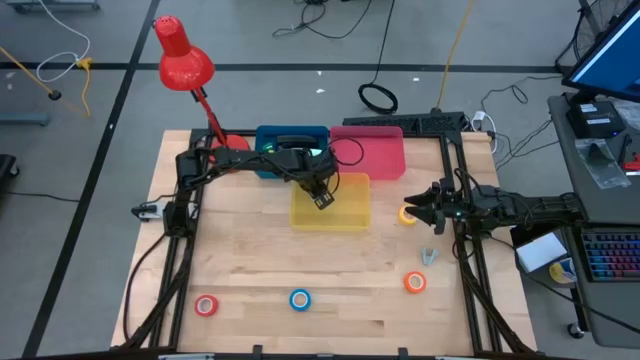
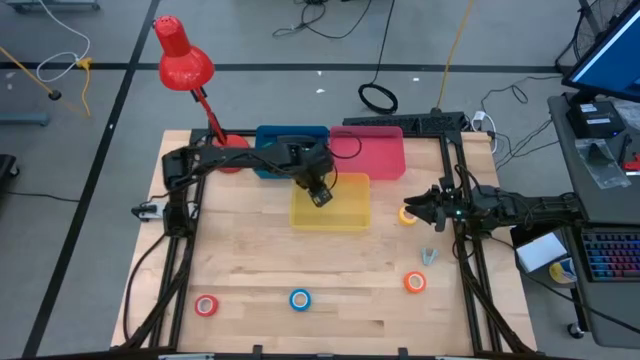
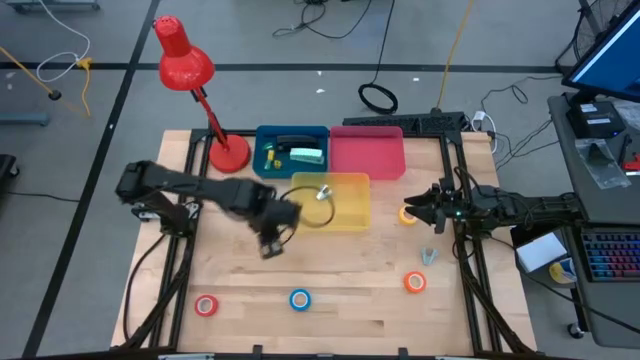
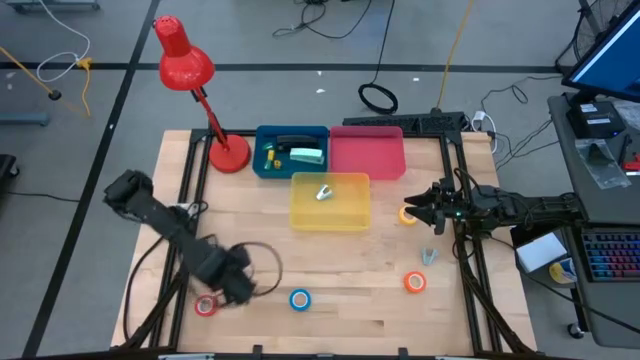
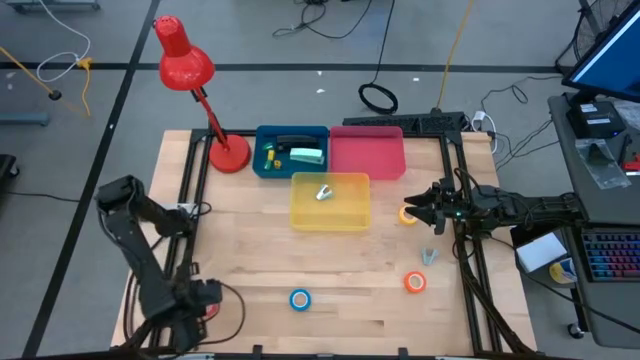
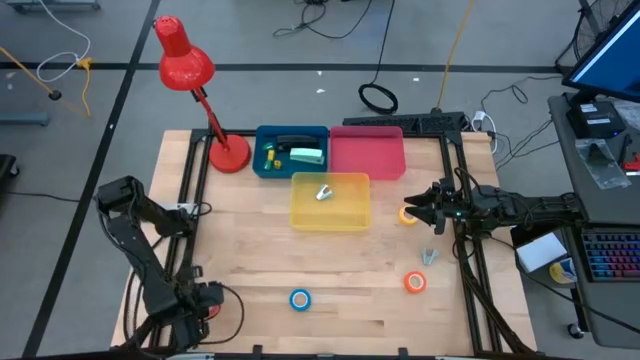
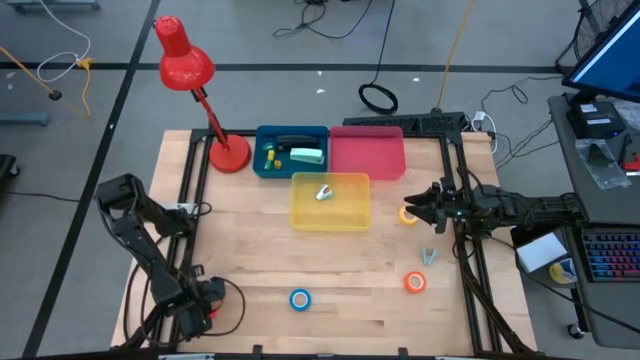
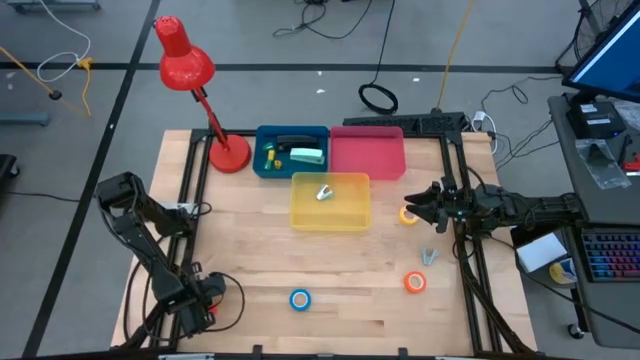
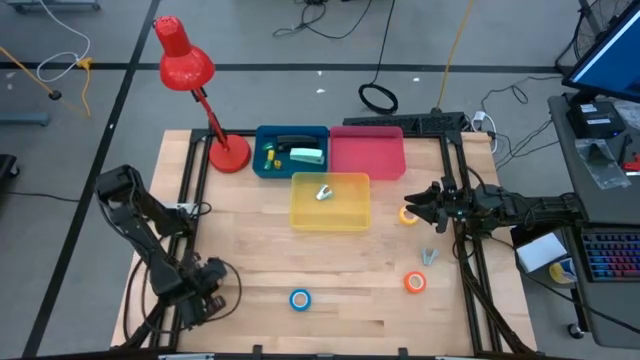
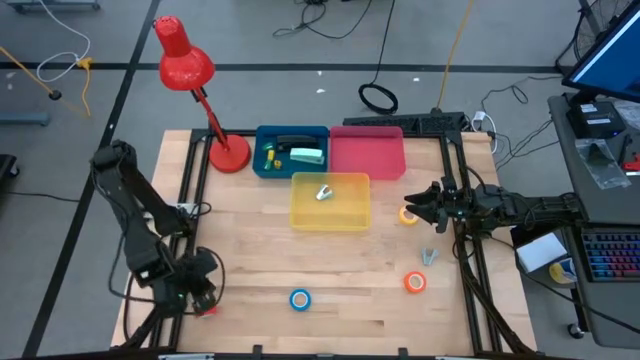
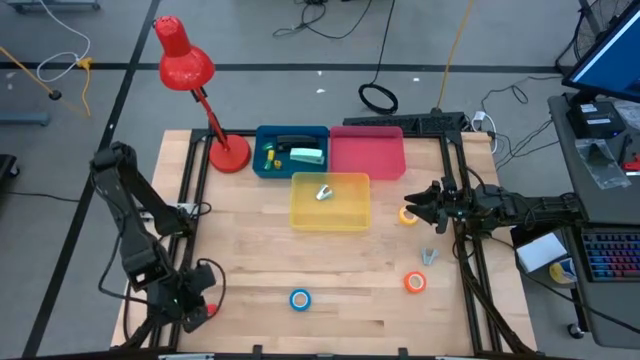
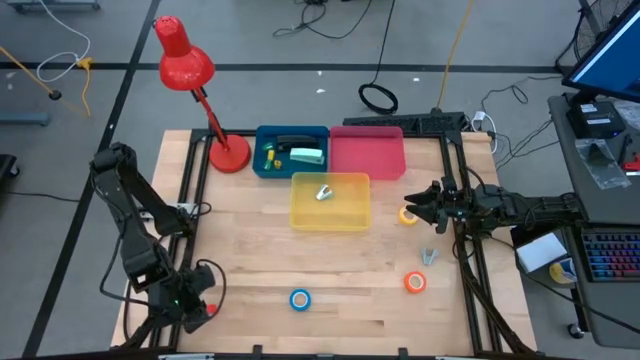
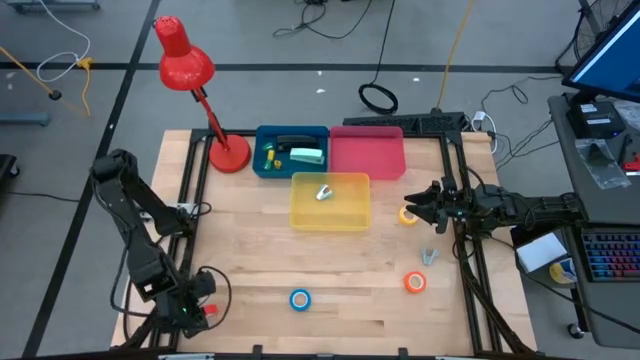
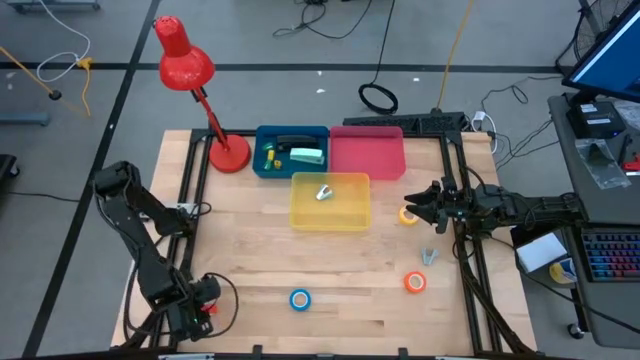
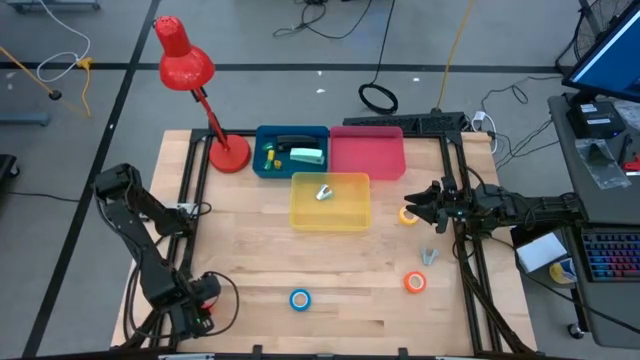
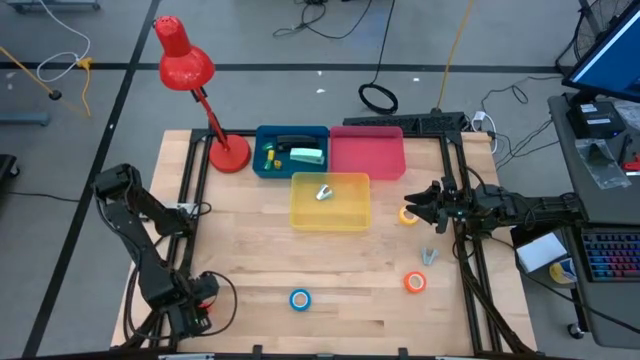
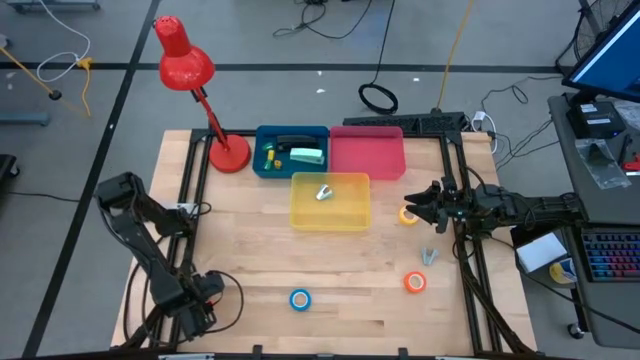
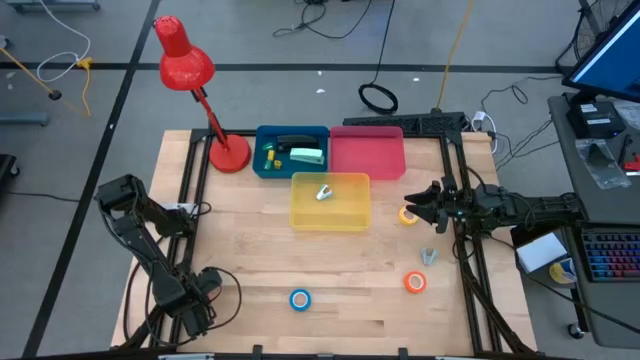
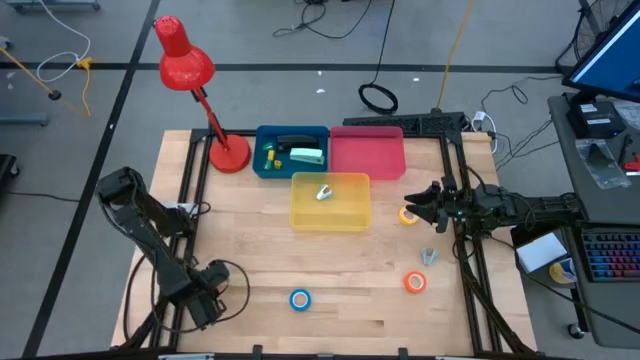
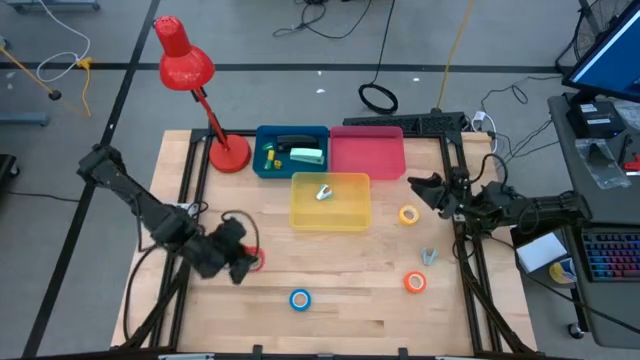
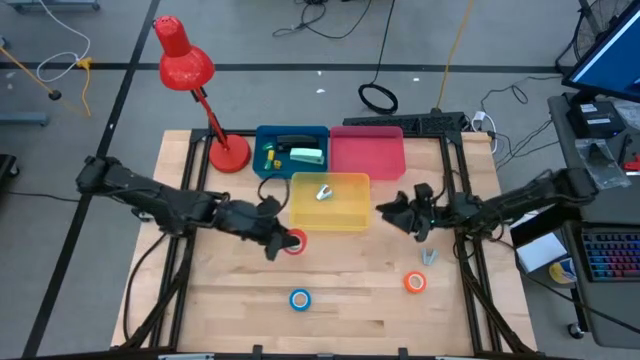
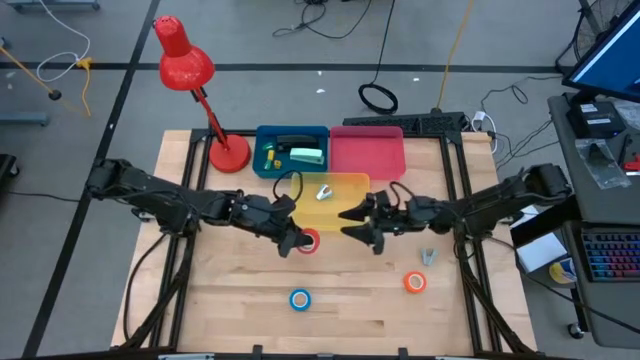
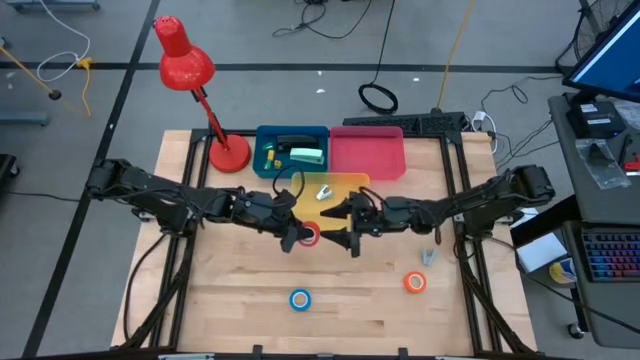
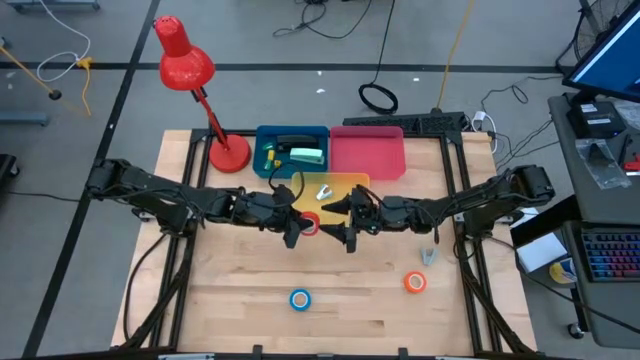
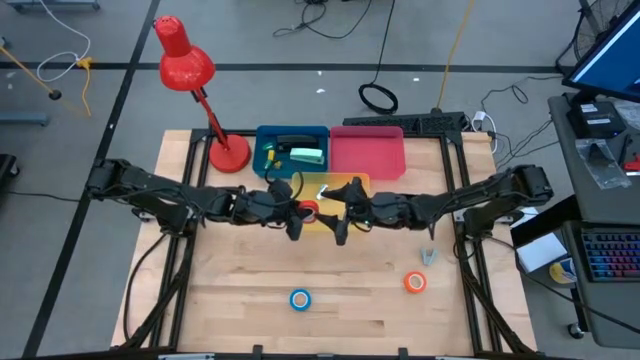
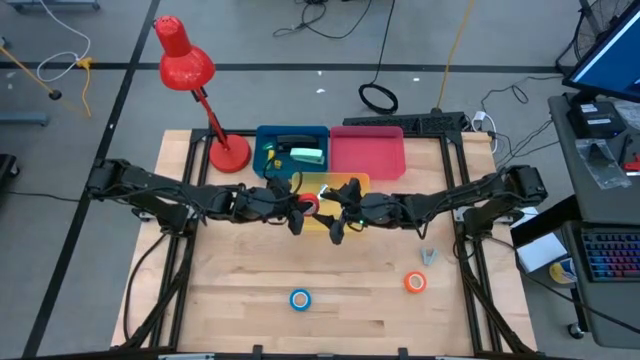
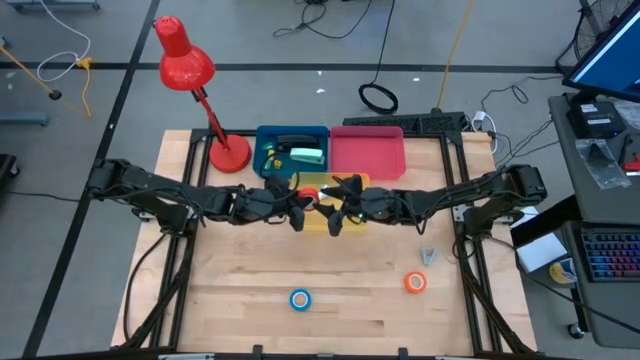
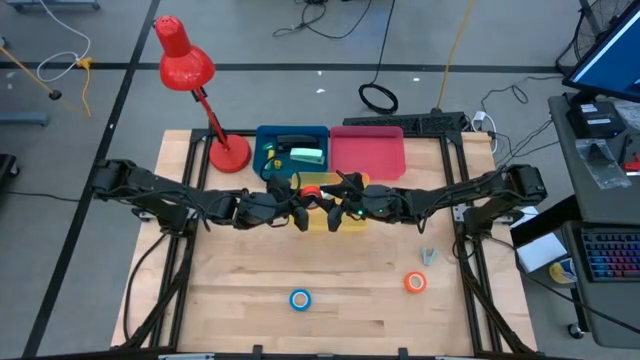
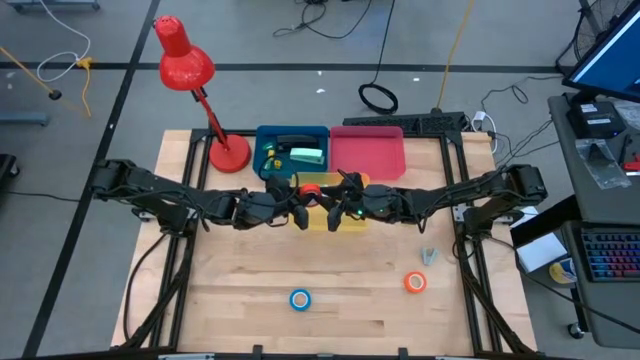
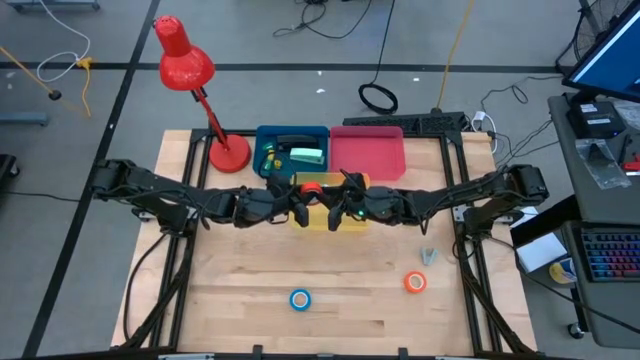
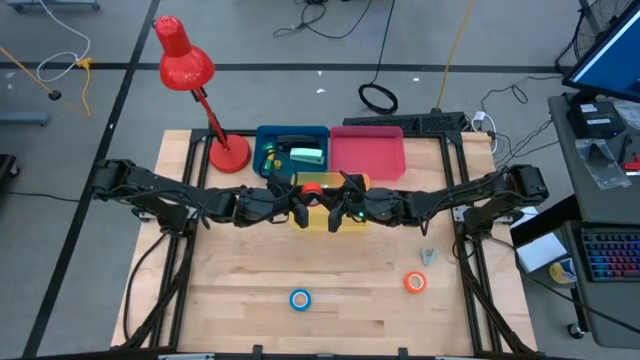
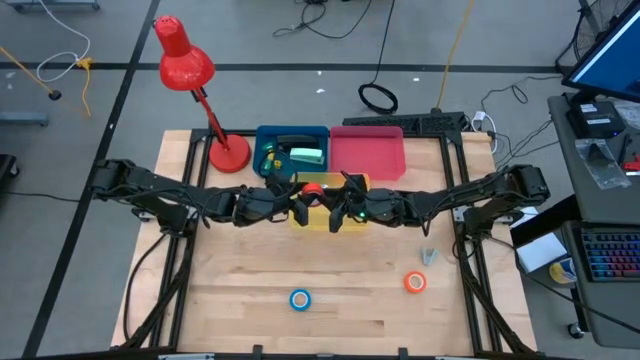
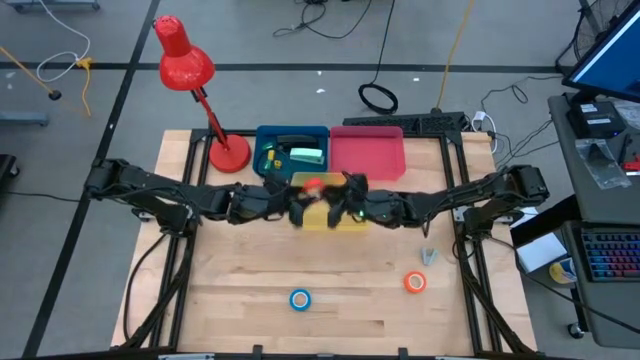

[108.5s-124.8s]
Task: Pick and place Stapler, Stapler remover, tape
Put the red tape into the pink bin

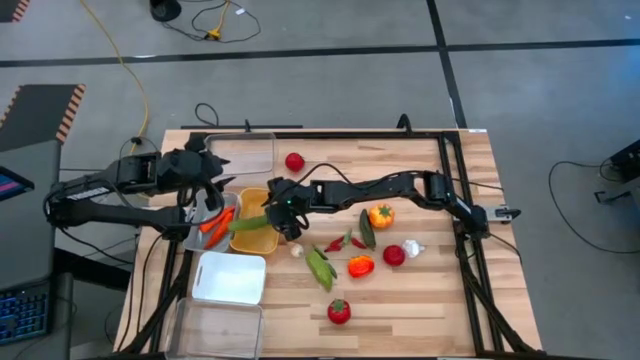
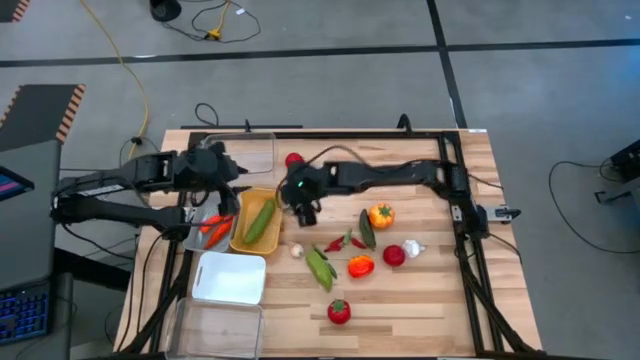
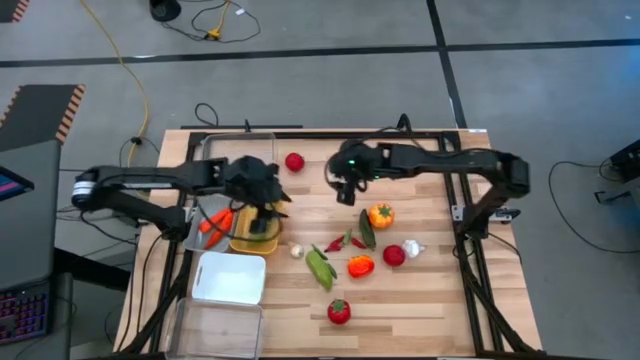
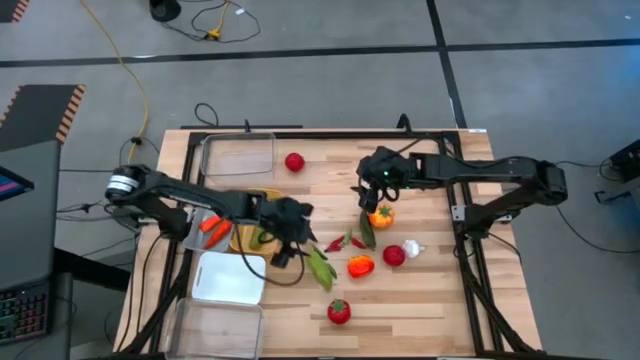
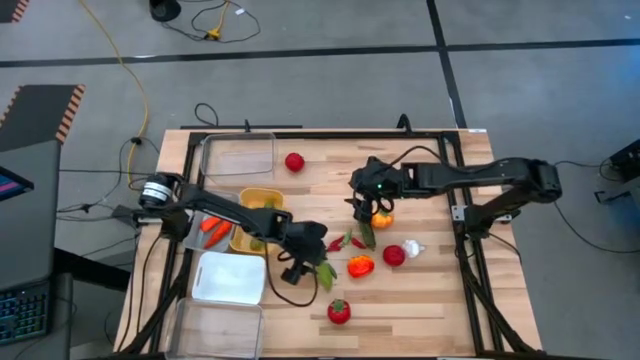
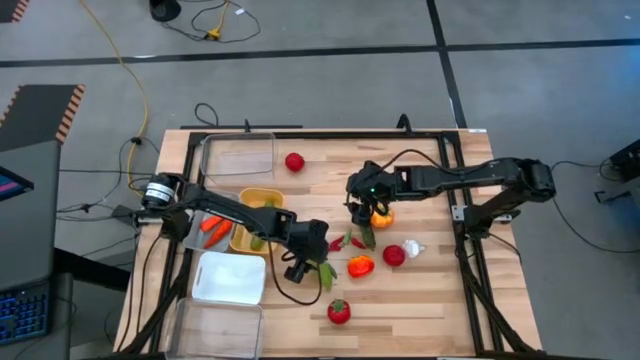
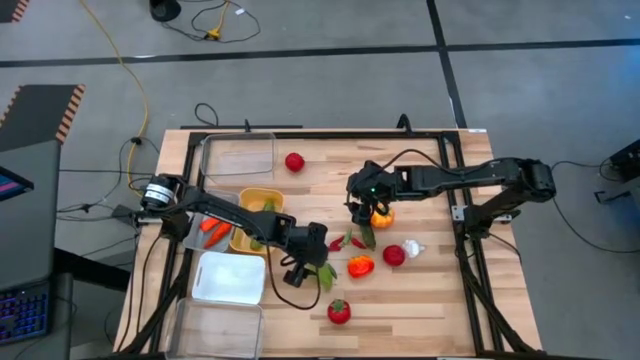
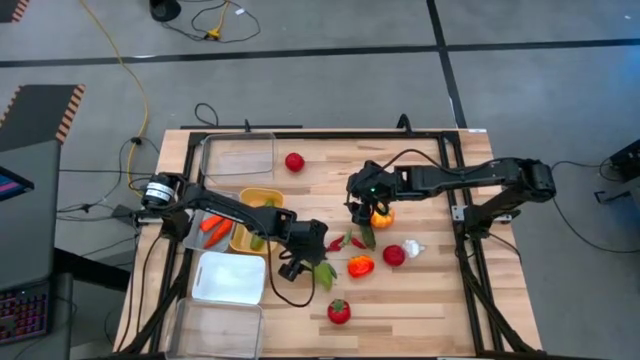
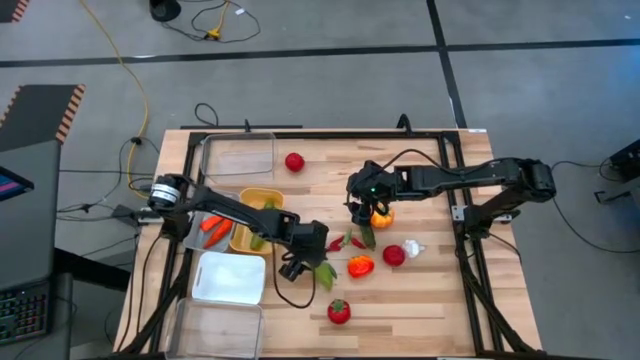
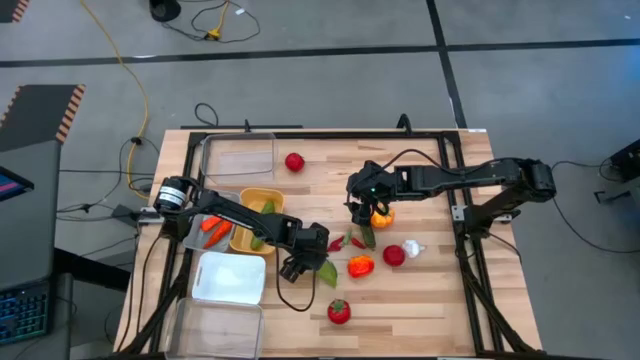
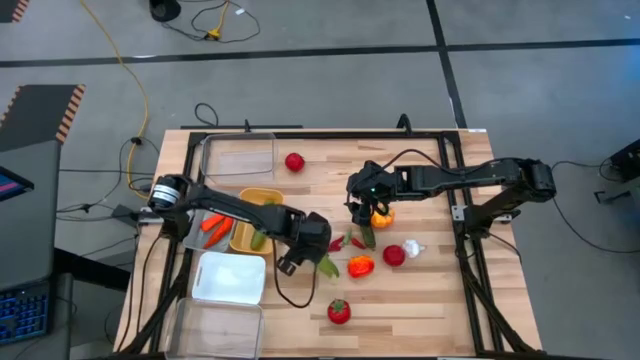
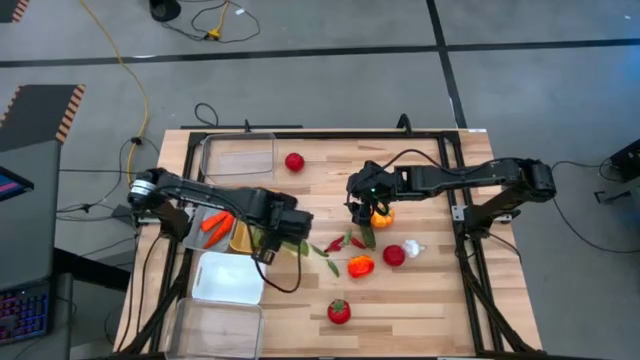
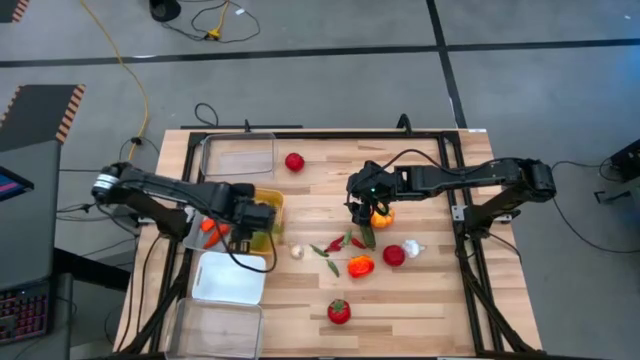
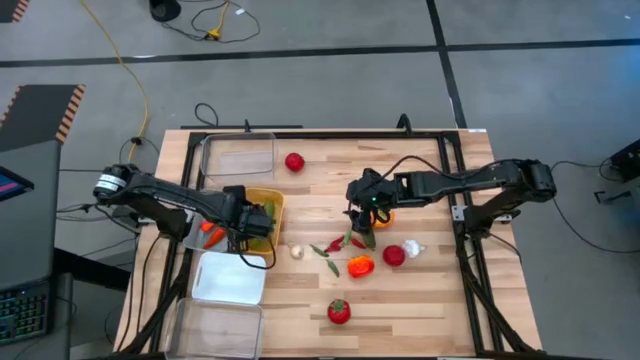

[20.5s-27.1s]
Task: Sort produce into baskets
Put the left bottom cucumber into the yellow bin
